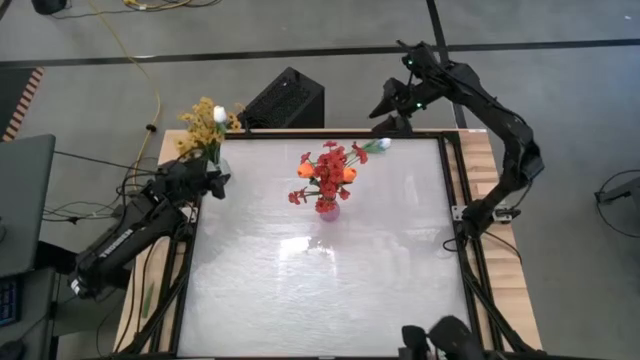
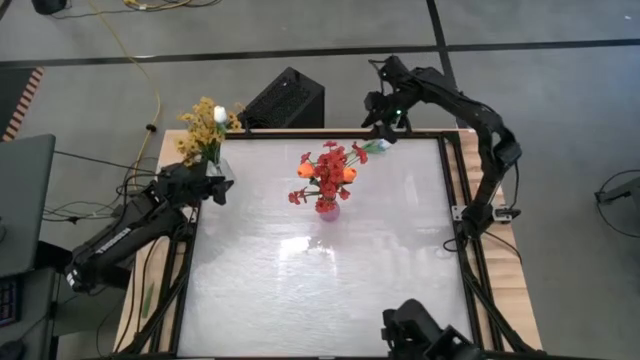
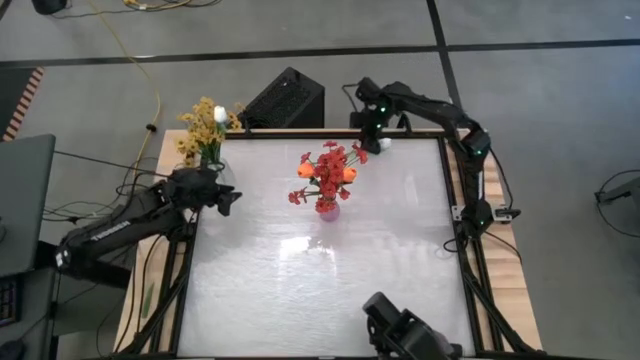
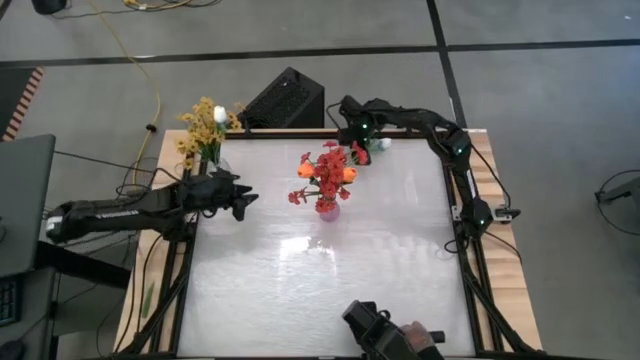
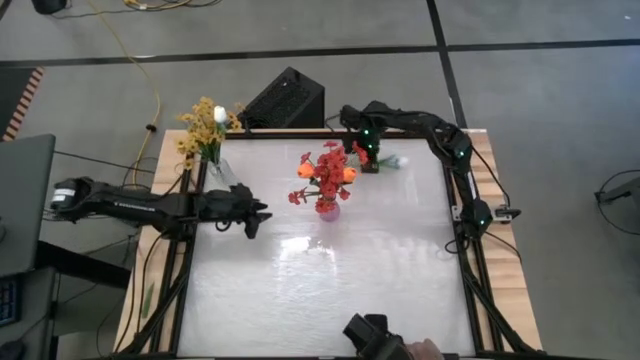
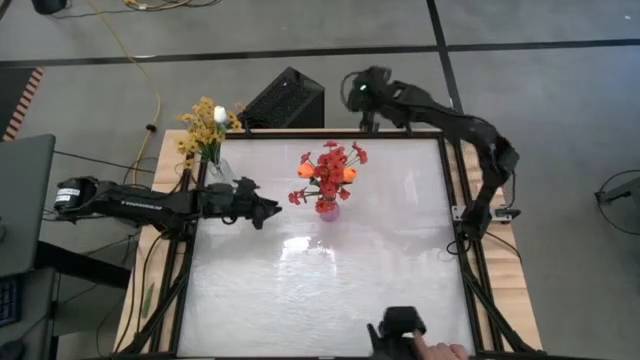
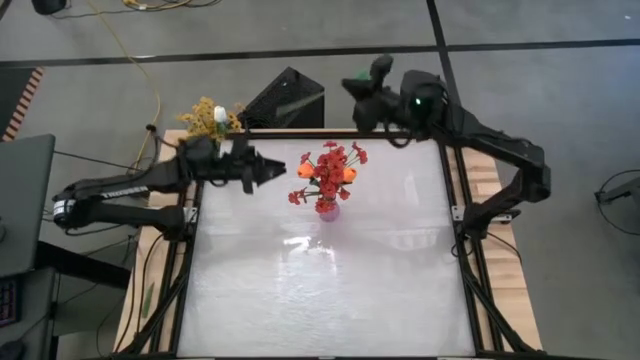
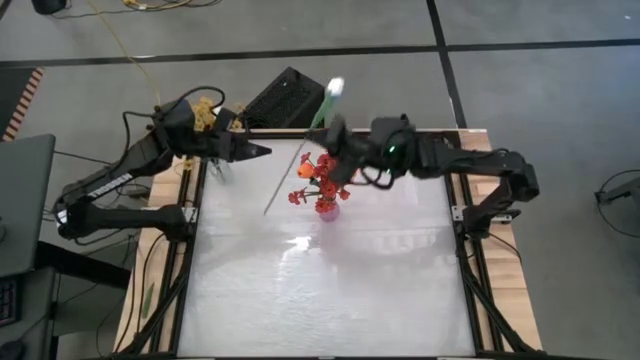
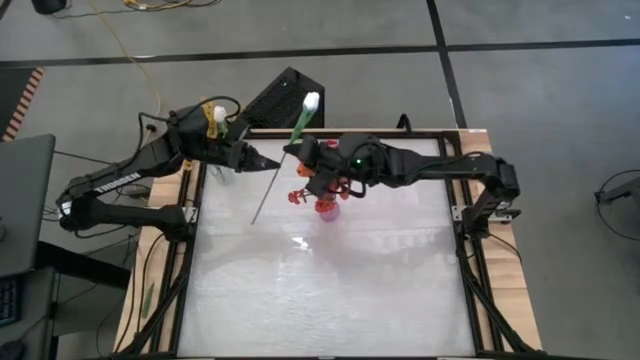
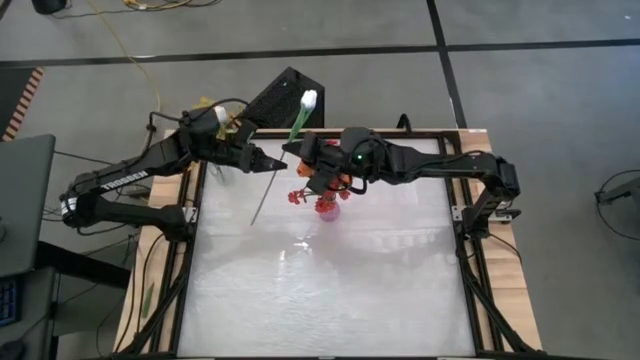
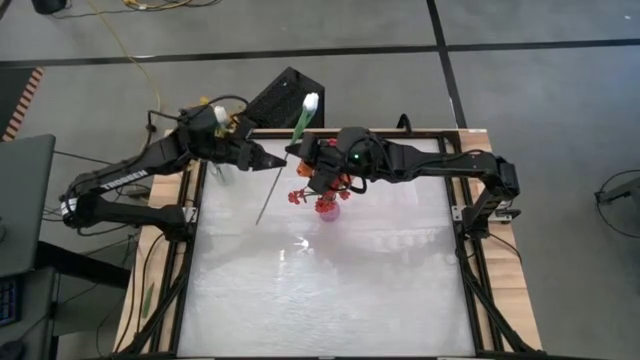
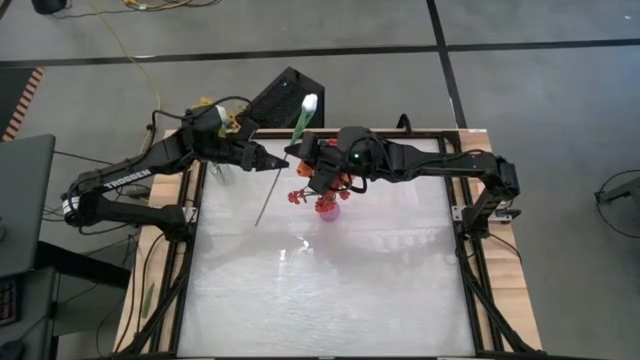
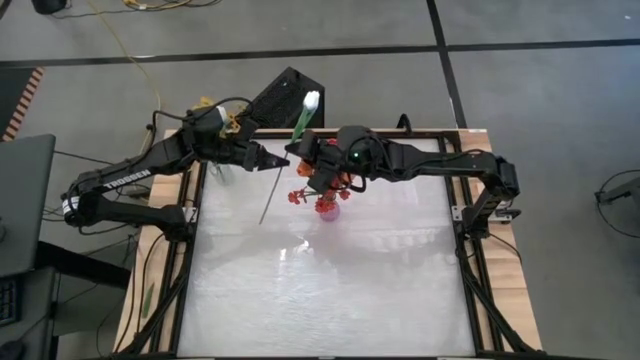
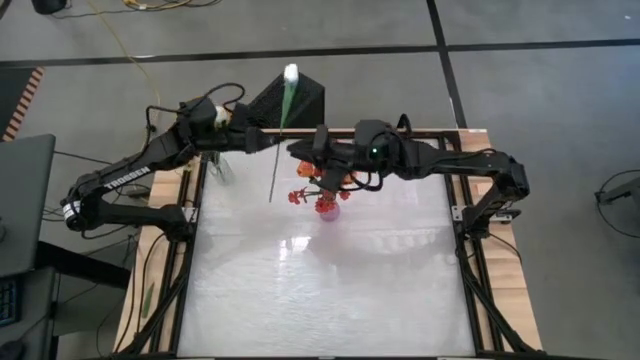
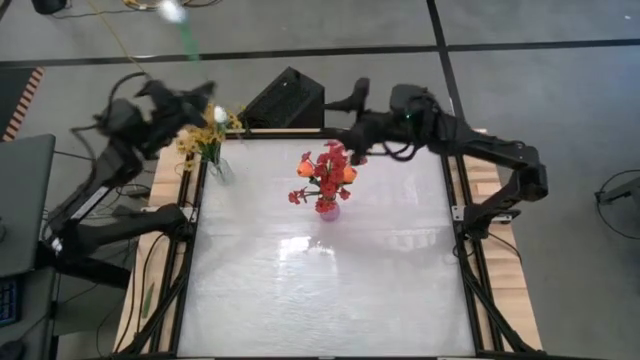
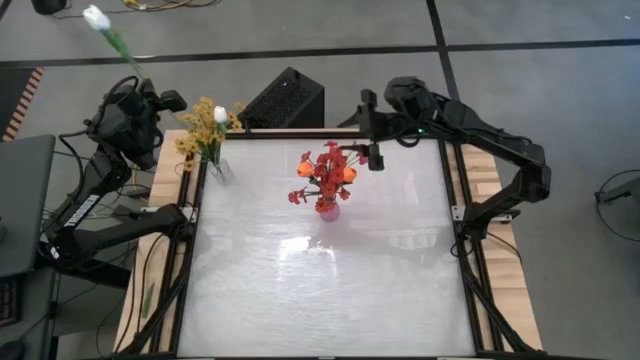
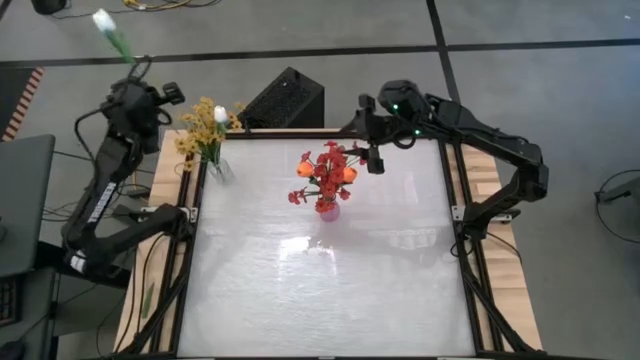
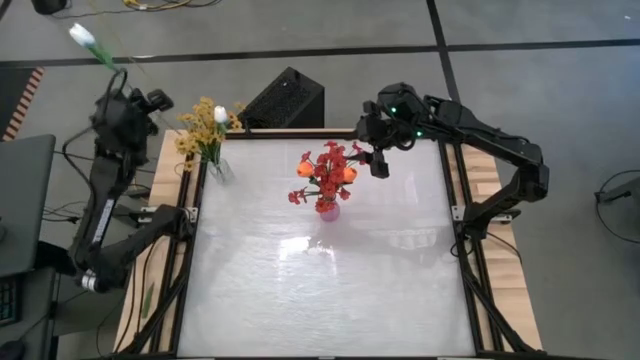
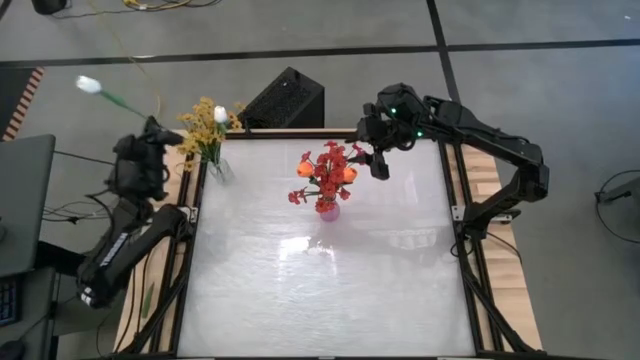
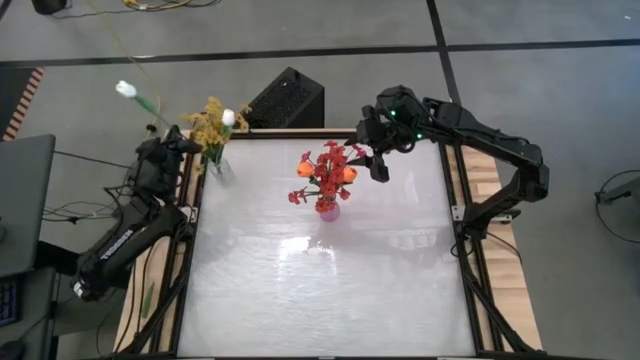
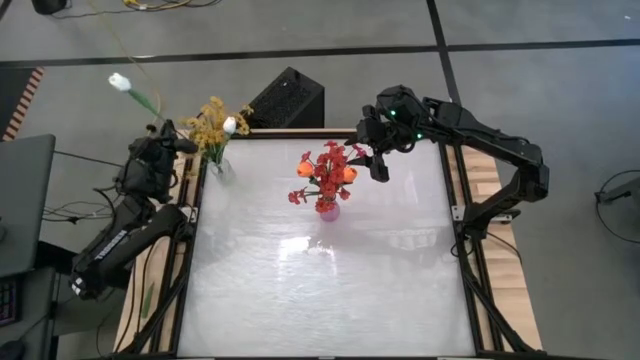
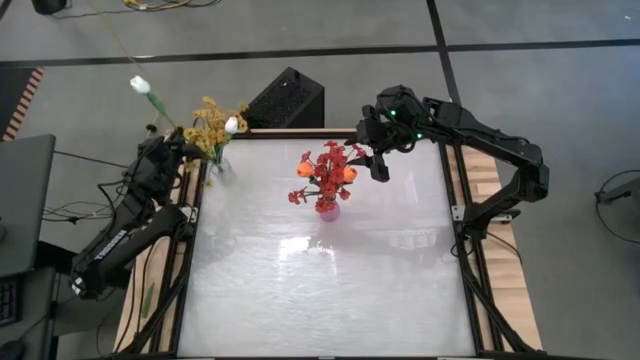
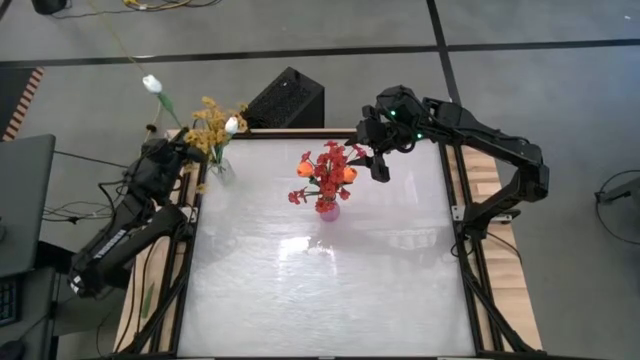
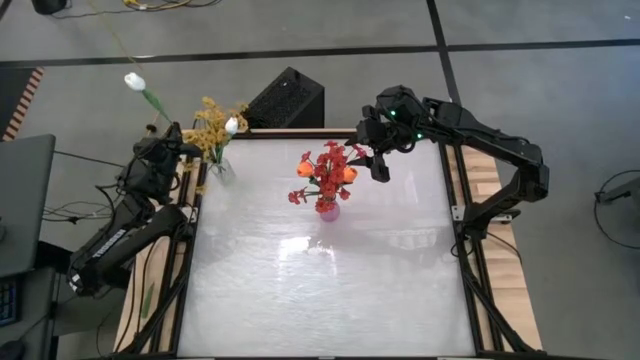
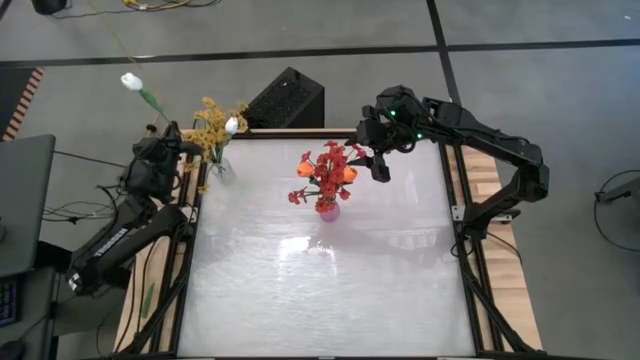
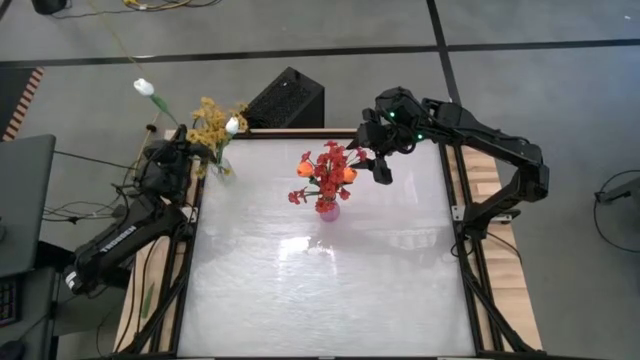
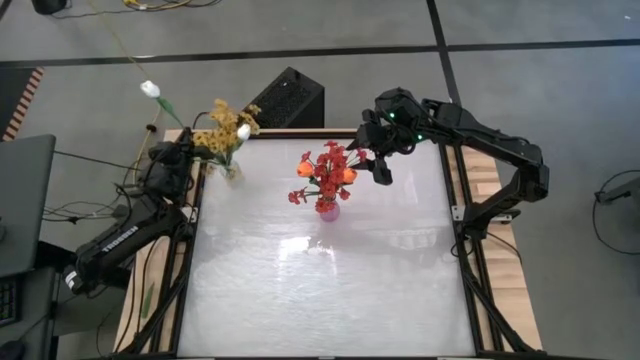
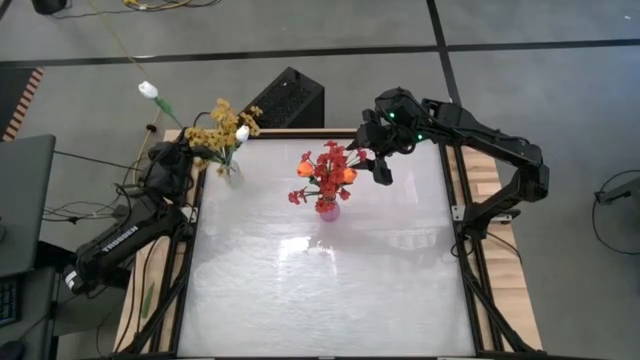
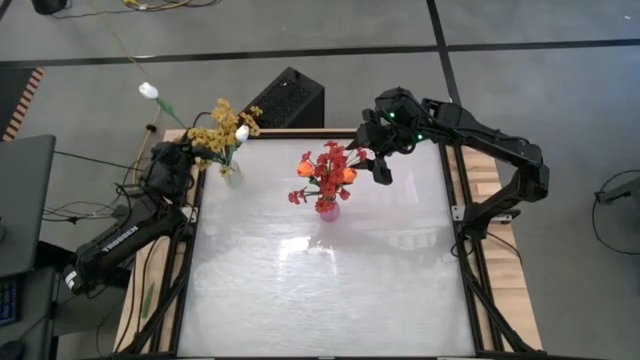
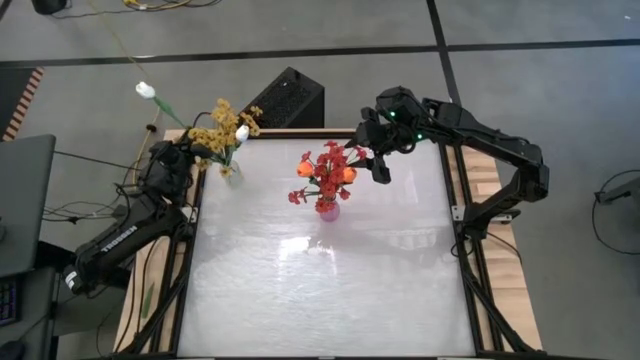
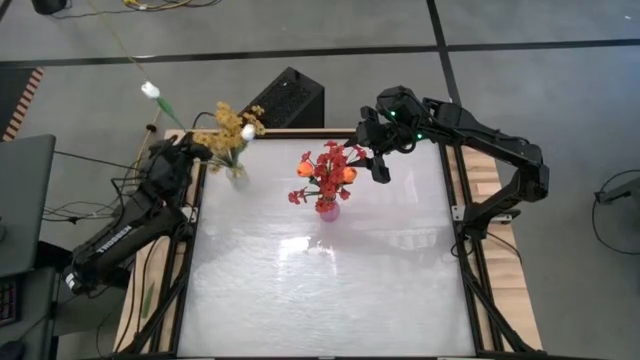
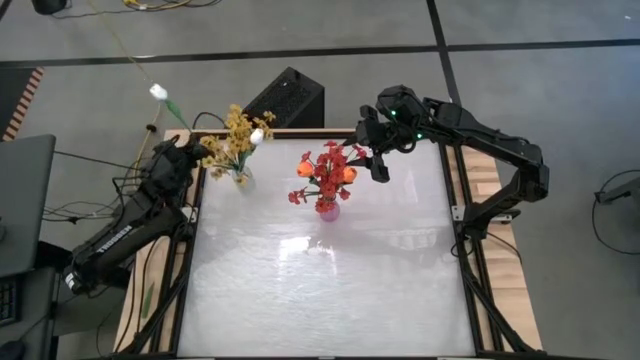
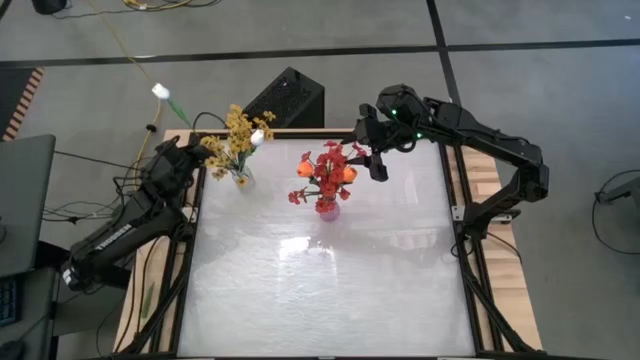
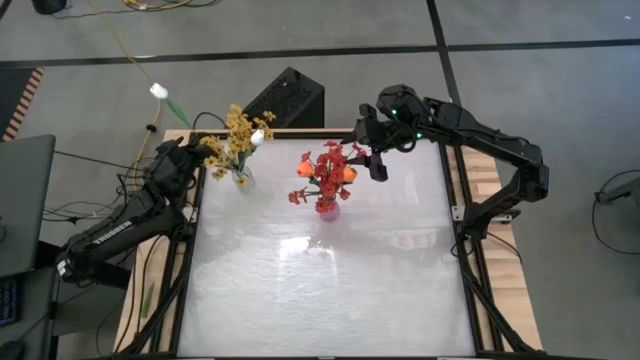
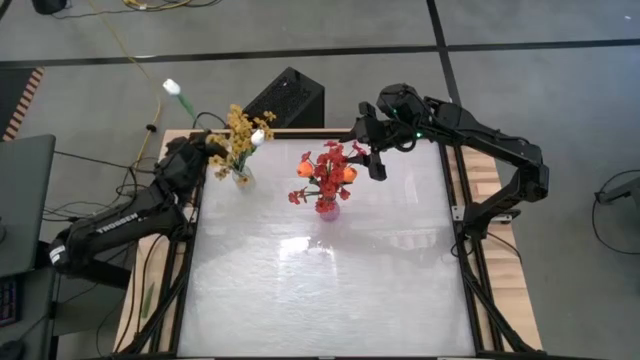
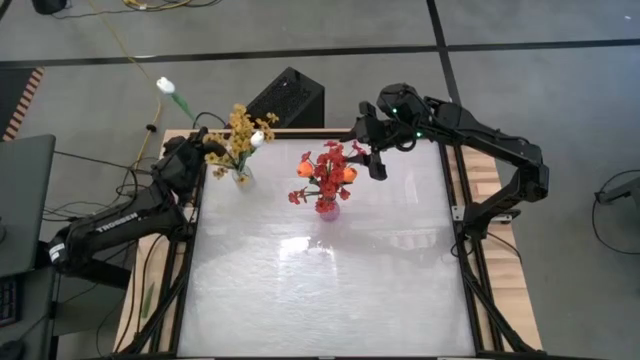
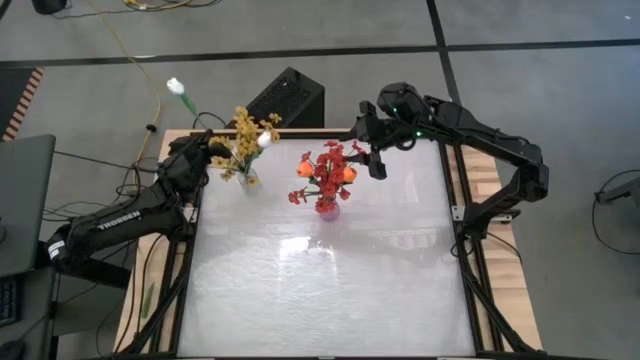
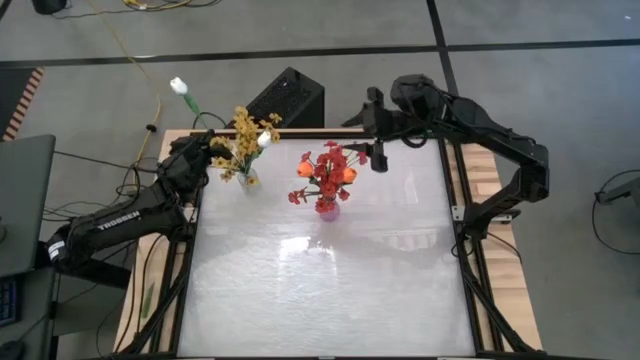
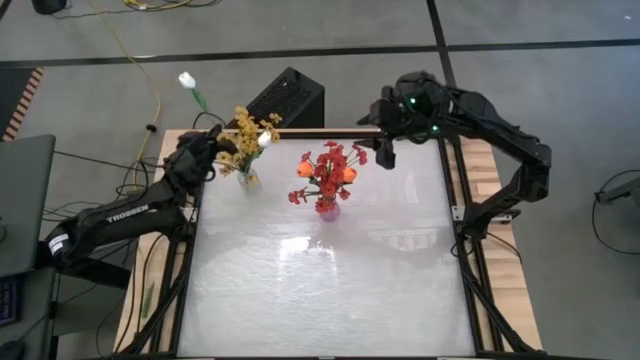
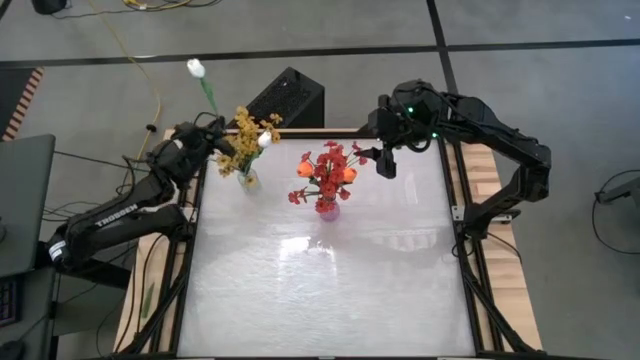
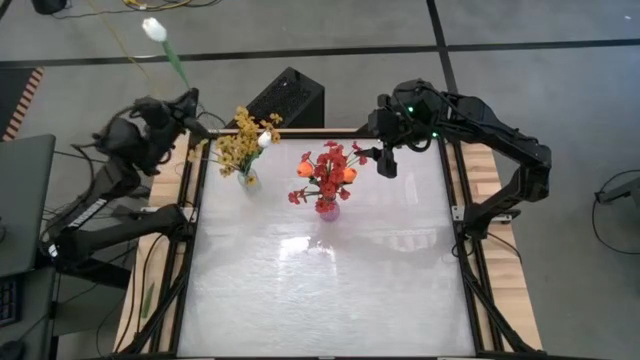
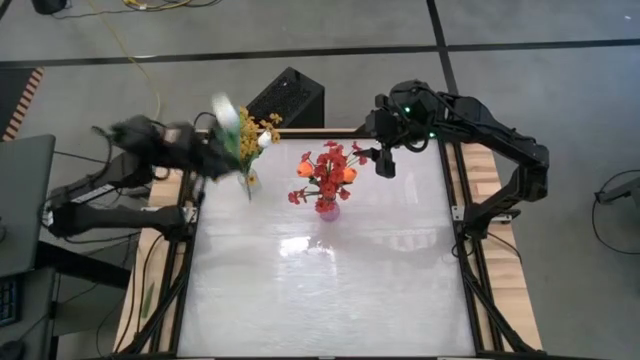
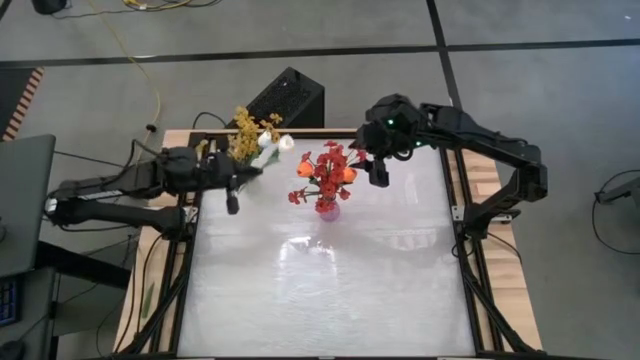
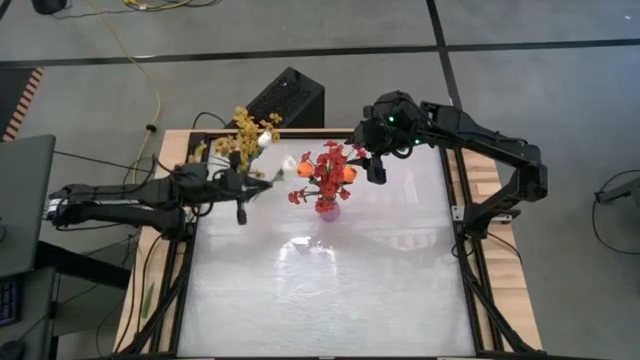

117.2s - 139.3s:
Task: Sort flowers into vase by color
Put the white tulip into the transparent vase
